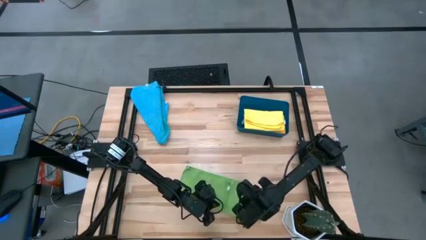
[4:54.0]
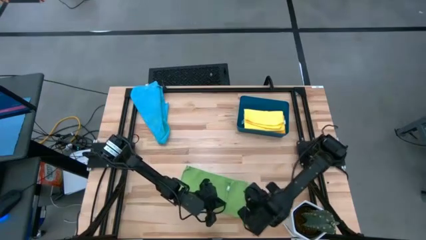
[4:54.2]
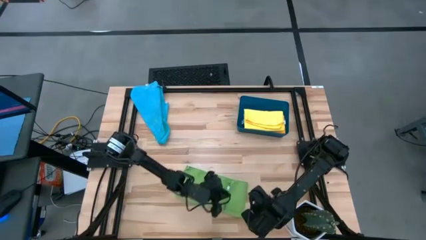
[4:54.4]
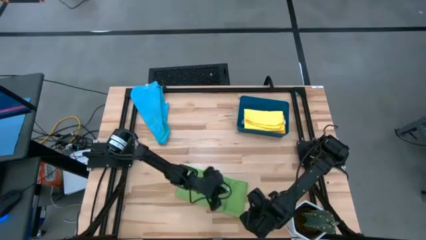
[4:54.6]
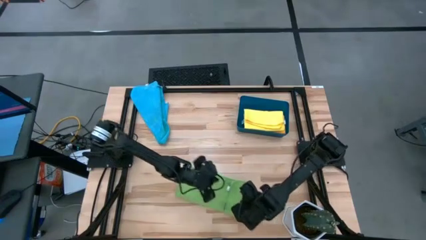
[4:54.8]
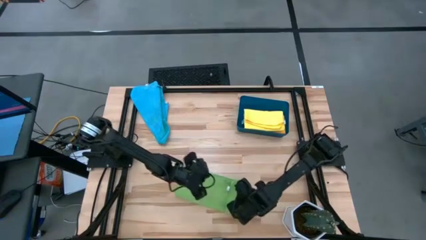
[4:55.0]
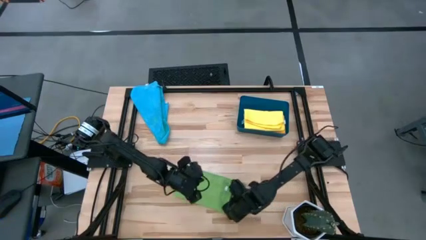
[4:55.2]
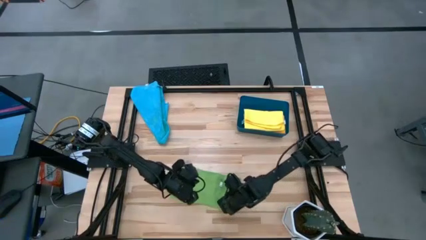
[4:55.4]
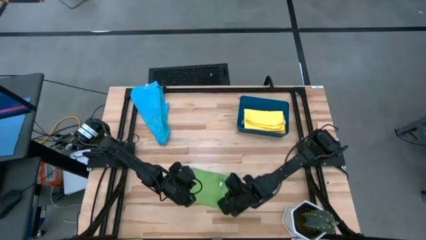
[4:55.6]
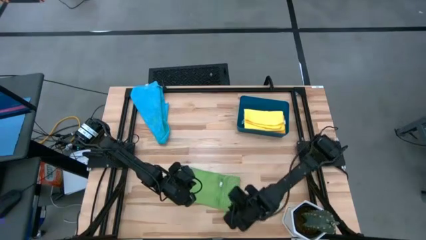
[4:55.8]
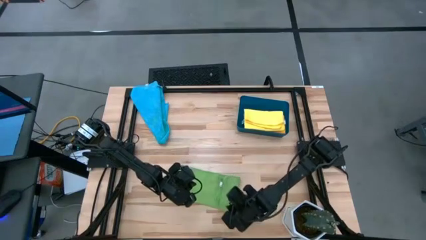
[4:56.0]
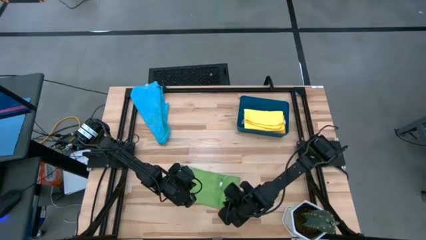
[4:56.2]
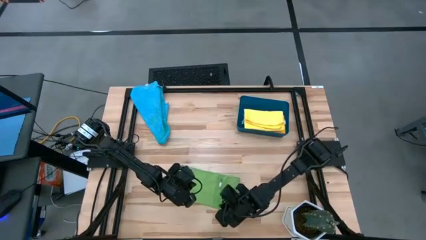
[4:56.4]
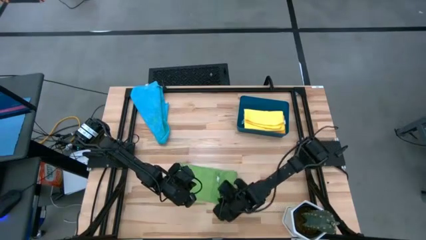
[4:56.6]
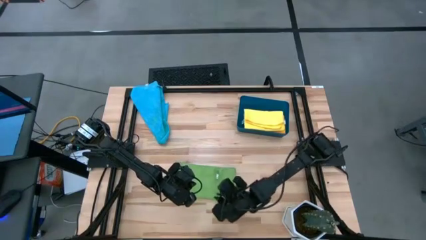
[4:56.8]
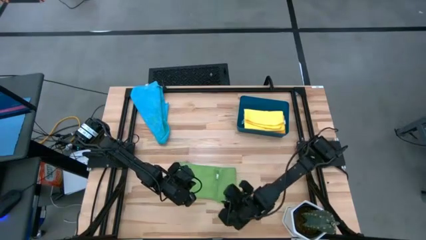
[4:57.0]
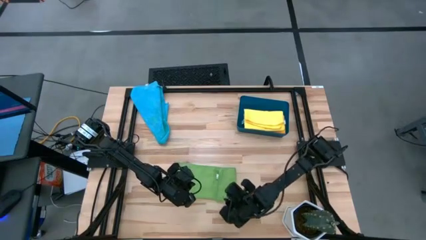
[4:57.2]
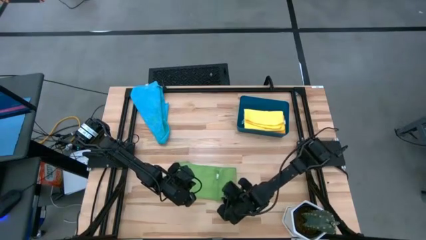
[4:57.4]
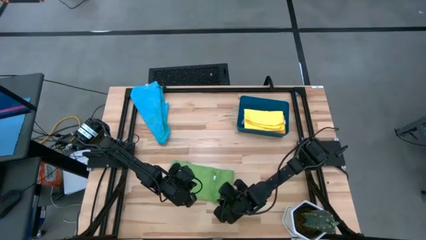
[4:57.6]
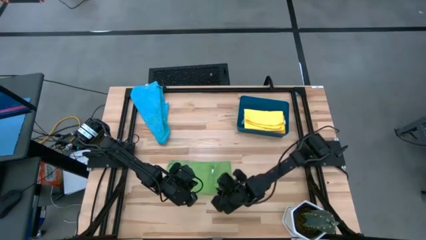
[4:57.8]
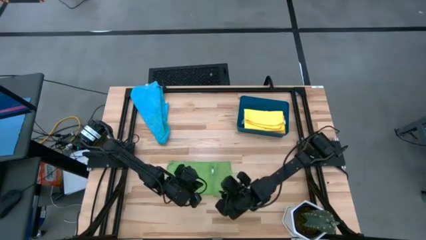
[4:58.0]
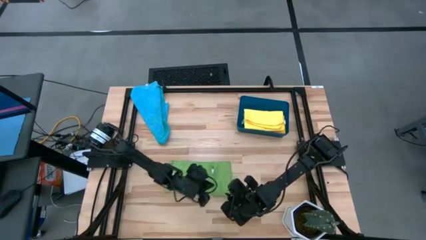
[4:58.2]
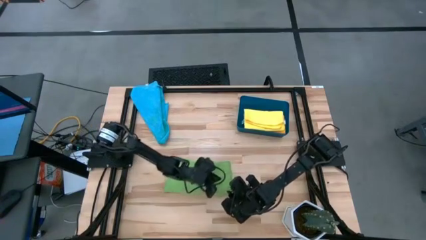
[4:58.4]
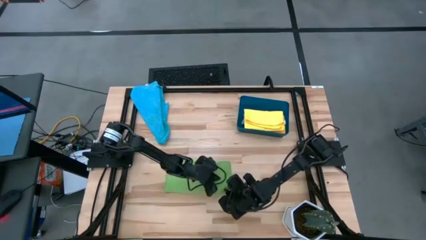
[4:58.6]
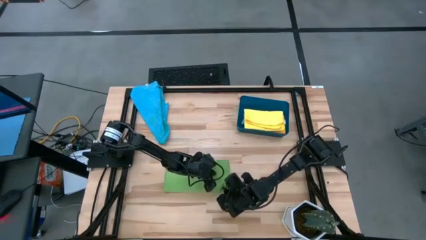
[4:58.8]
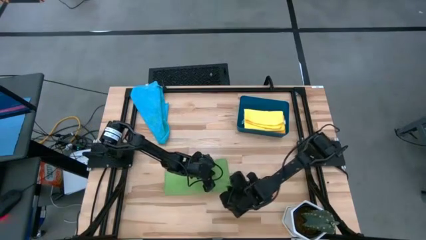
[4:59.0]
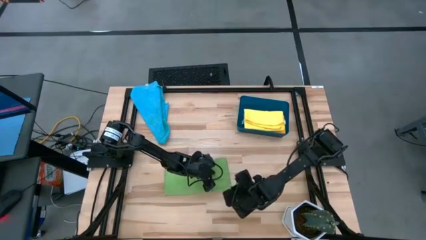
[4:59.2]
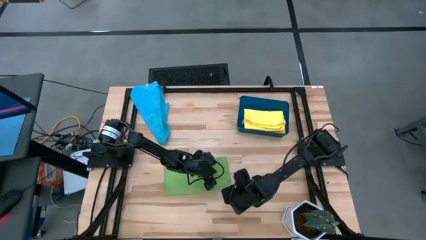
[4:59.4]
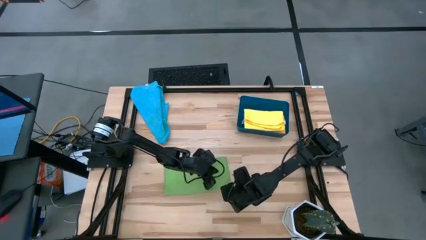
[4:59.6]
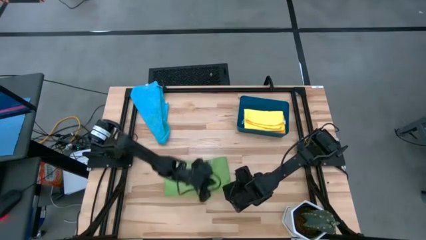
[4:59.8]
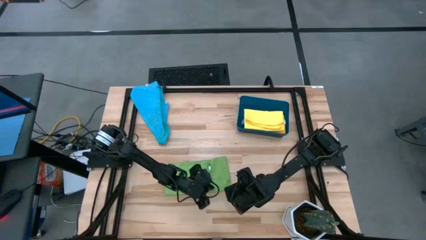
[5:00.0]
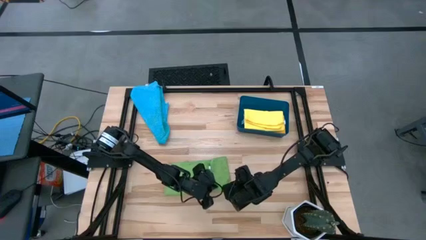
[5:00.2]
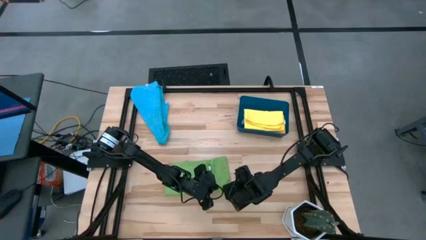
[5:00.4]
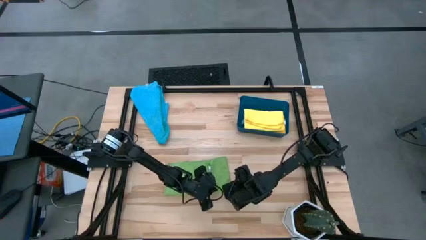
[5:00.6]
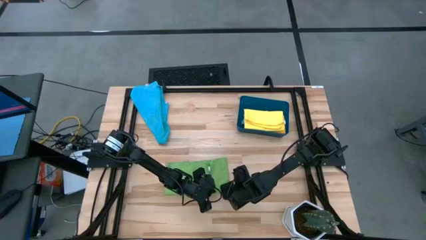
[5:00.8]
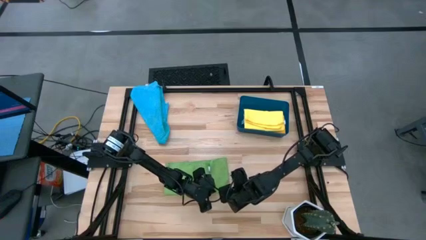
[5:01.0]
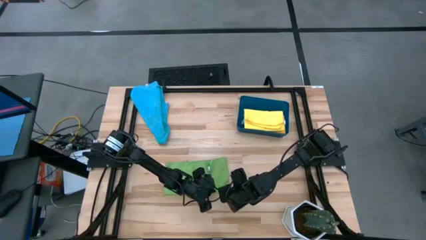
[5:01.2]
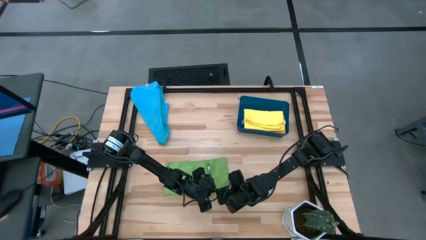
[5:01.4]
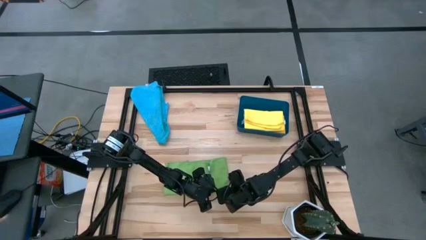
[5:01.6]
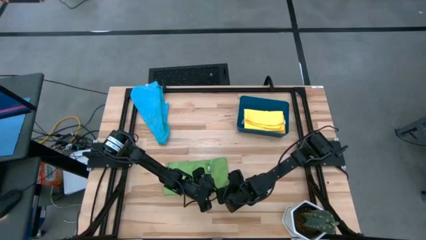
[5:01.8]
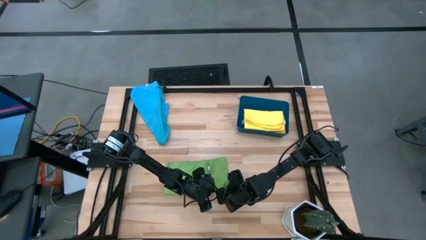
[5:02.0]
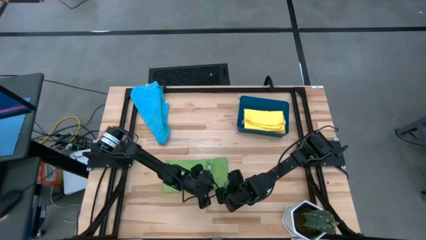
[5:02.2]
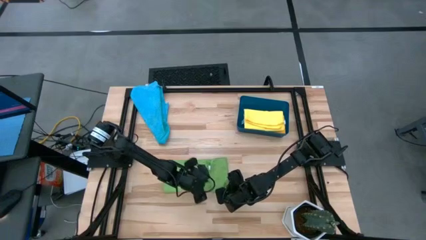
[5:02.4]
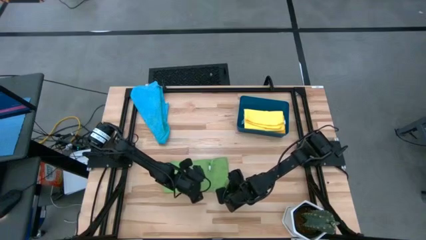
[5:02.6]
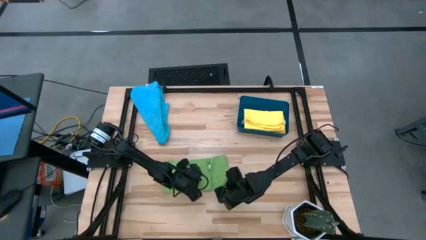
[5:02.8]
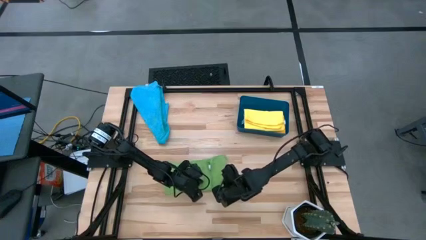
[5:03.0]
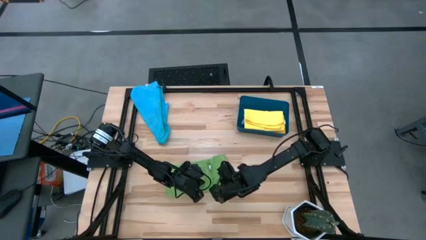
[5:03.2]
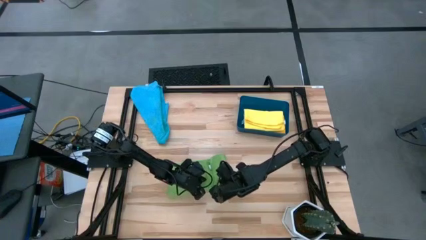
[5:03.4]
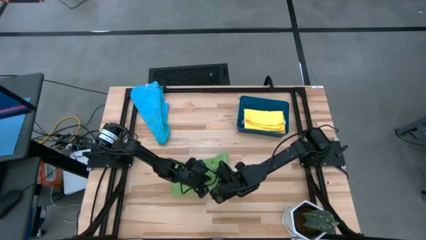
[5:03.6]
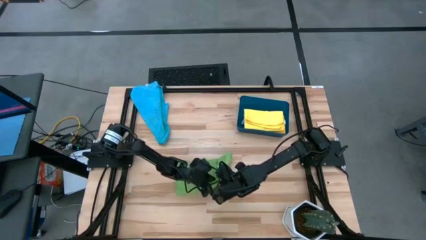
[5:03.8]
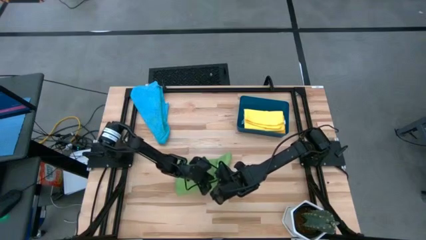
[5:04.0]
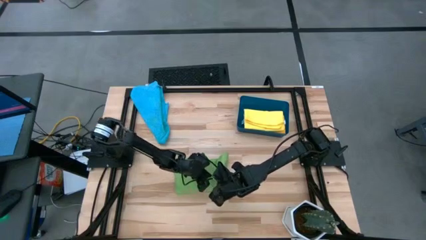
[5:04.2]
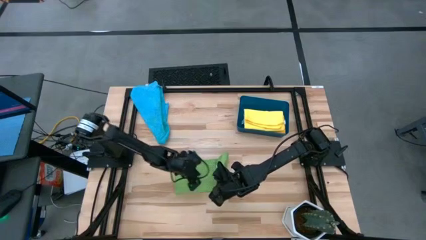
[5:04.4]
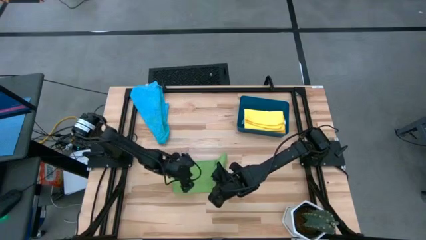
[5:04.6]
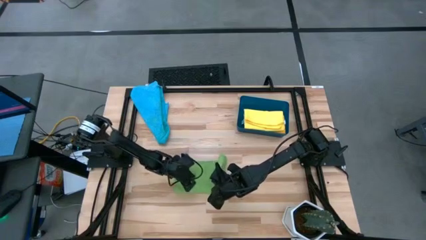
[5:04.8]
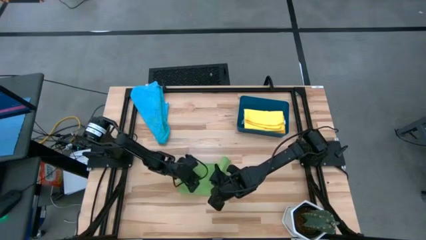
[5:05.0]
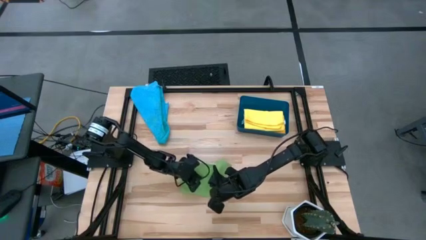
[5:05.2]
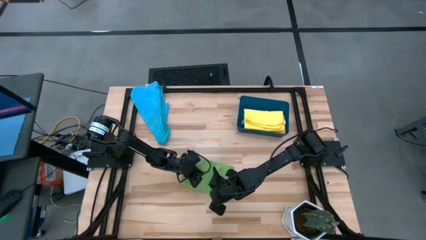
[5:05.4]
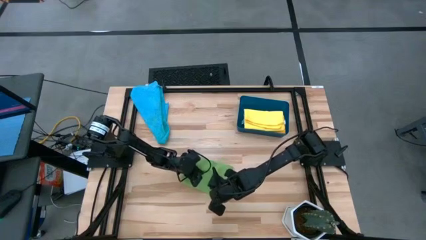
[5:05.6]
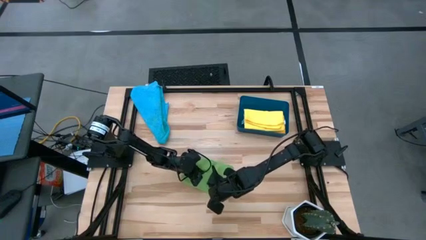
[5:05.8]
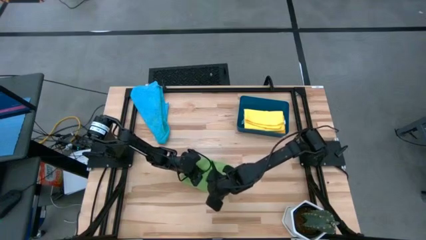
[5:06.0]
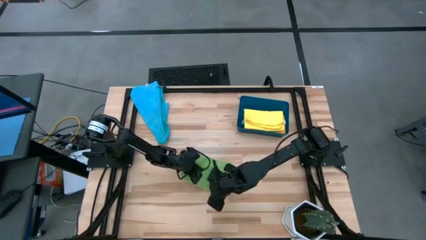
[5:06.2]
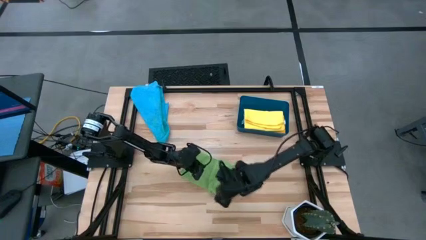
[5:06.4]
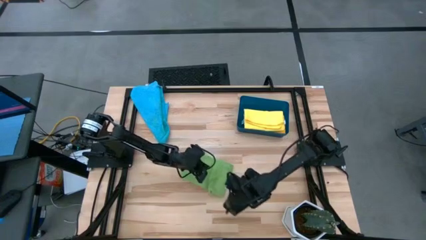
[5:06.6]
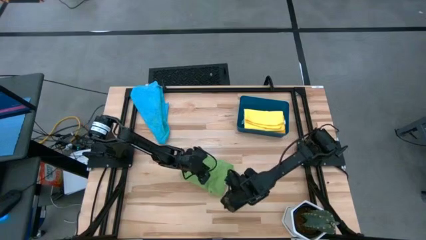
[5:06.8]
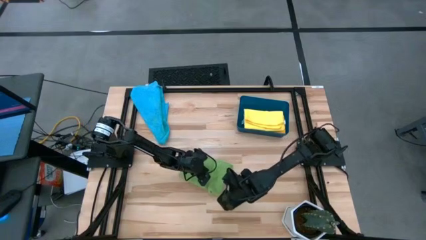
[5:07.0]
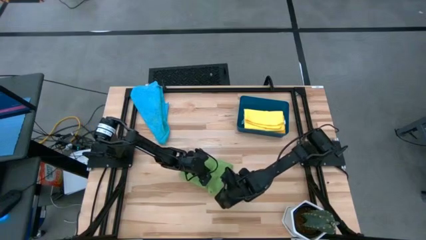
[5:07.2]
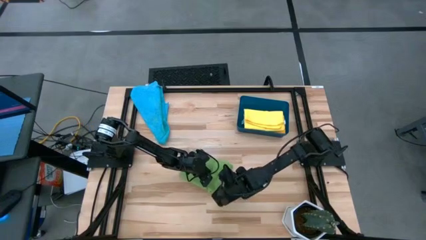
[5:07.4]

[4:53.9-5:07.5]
Task: Fold microfiber towels
Fold the green microfiber cloth

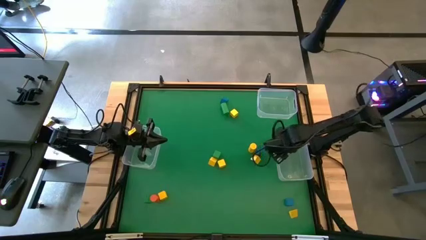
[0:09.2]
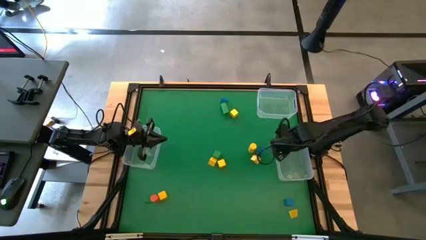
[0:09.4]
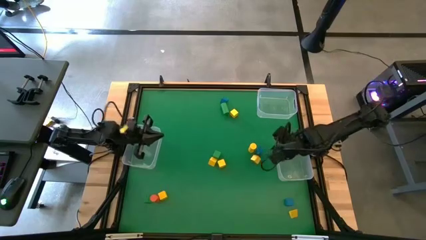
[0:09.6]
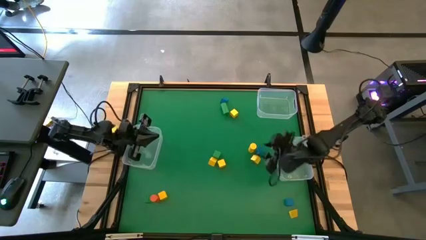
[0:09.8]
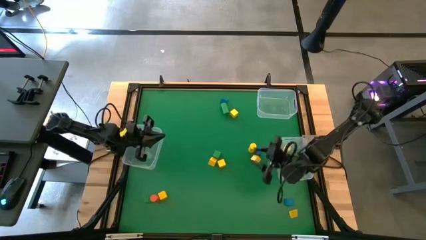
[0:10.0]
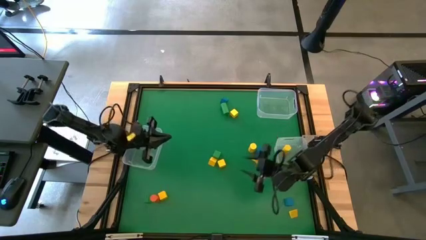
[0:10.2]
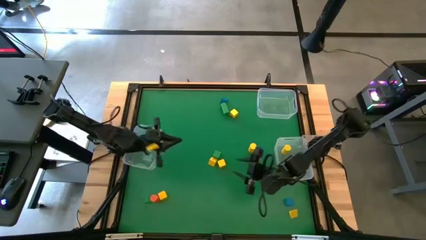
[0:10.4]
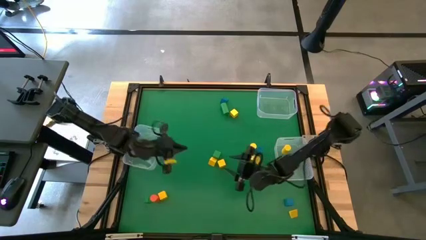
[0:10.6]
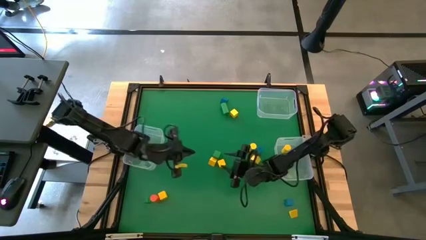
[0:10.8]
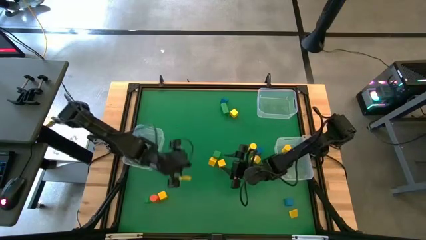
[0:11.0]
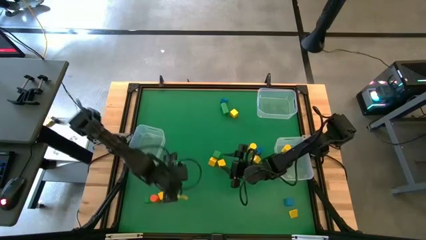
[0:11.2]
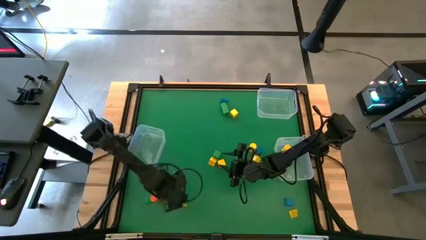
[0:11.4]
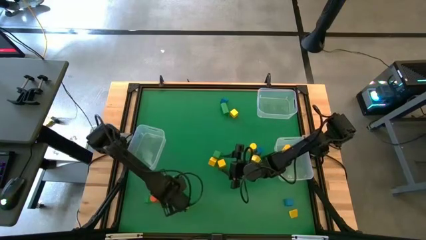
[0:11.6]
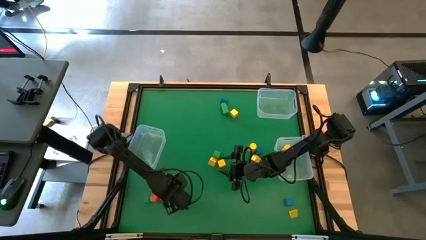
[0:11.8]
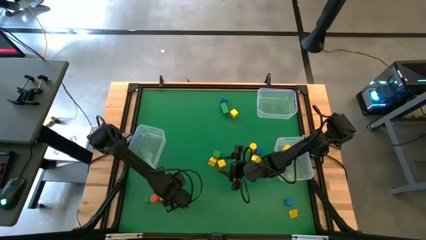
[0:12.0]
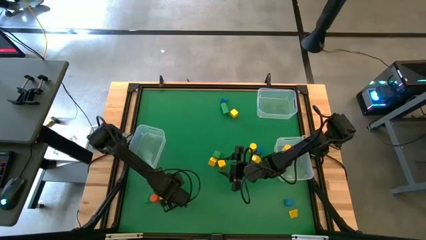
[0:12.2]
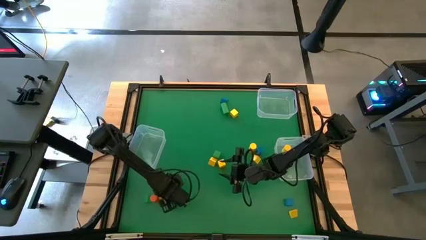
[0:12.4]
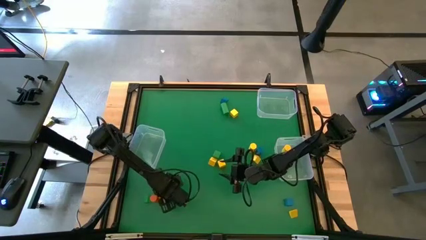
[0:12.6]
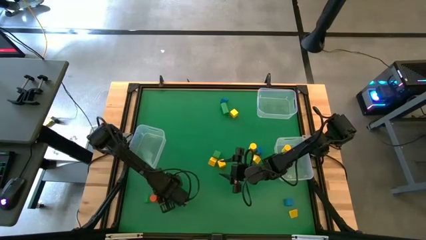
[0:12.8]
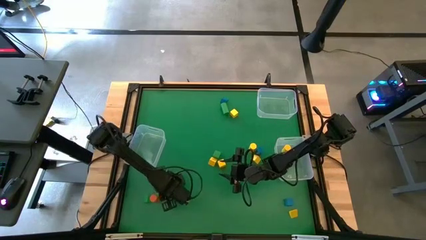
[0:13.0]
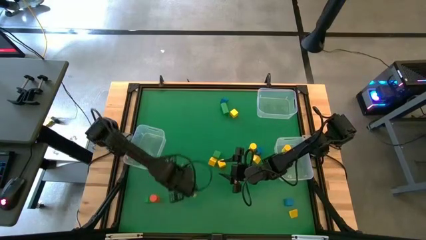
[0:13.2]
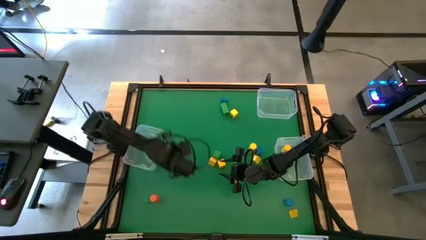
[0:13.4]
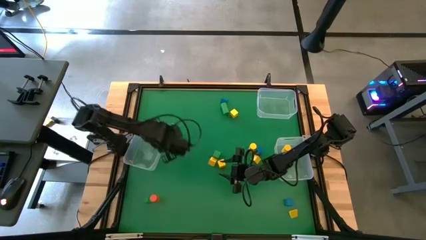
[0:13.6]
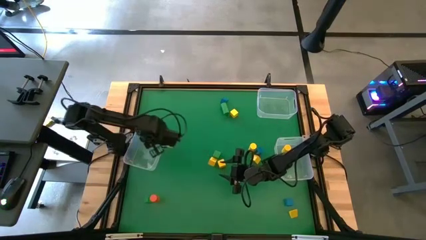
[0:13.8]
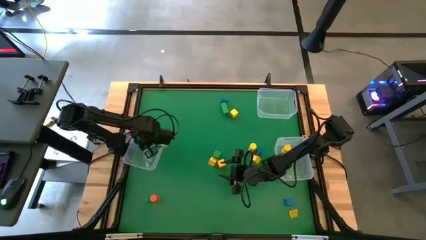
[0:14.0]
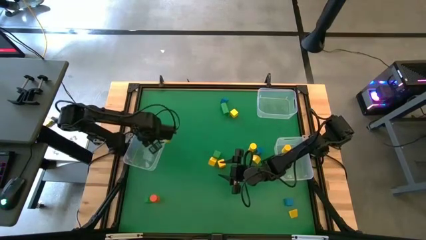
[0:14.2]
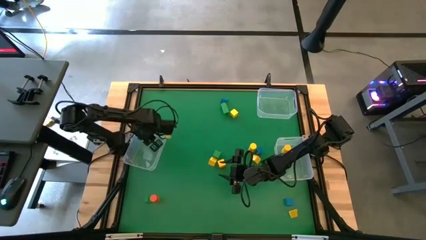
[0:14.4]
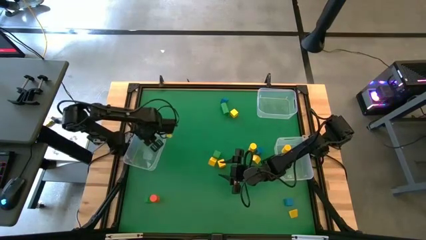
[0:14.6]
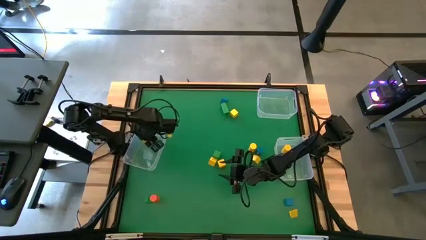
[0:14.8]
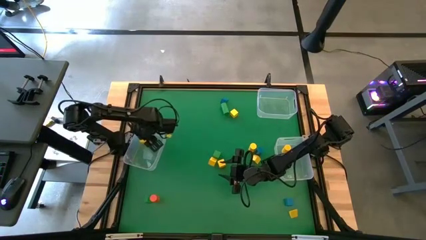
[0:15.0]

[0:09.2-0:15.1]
Task: Sort blocks by size
Put the yellow square block into the bottom left transparent bin
